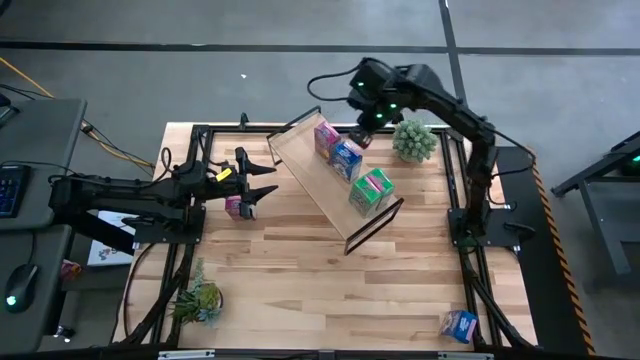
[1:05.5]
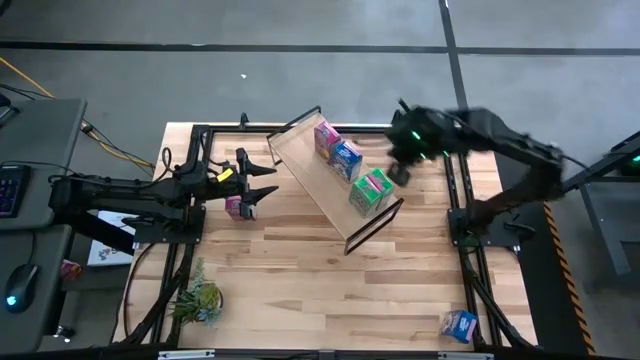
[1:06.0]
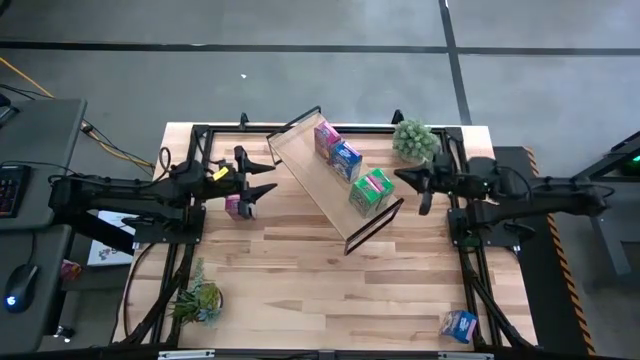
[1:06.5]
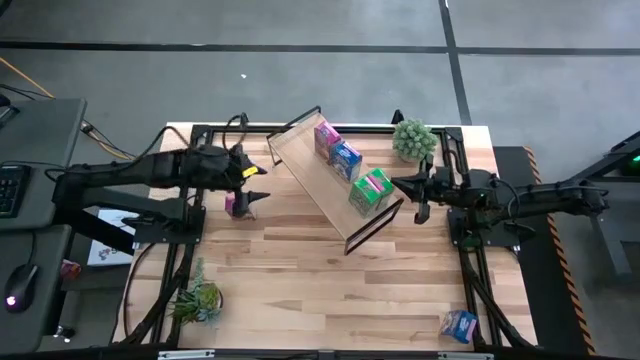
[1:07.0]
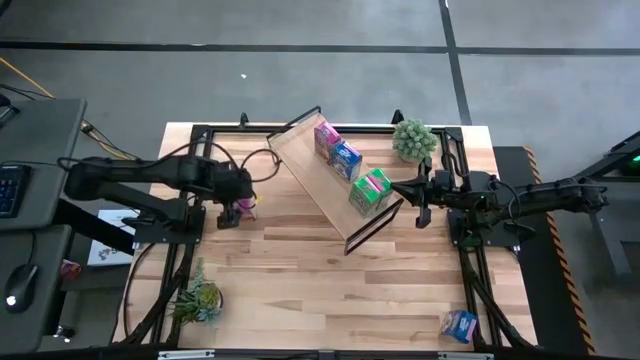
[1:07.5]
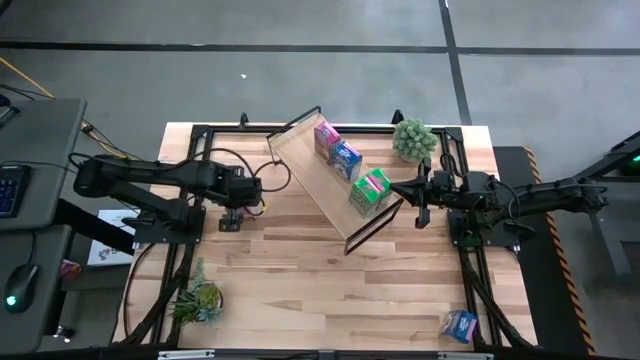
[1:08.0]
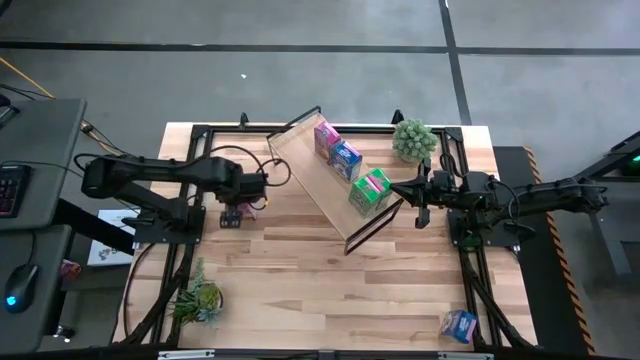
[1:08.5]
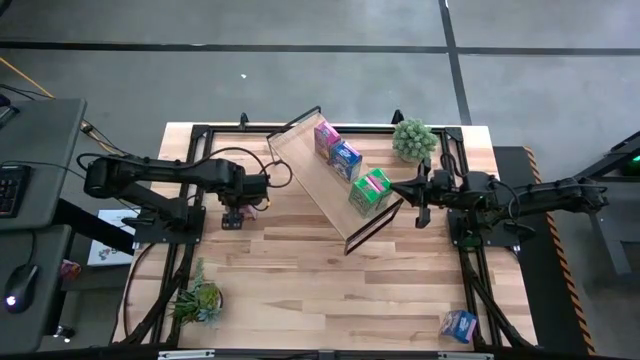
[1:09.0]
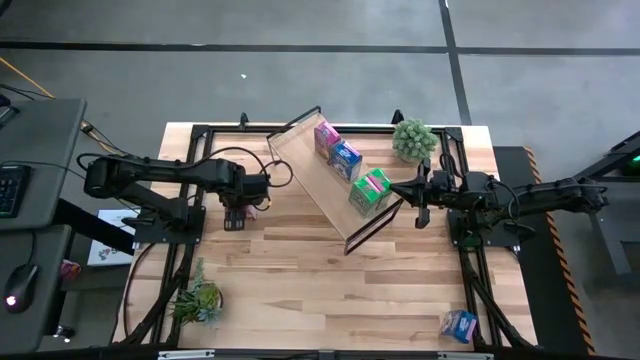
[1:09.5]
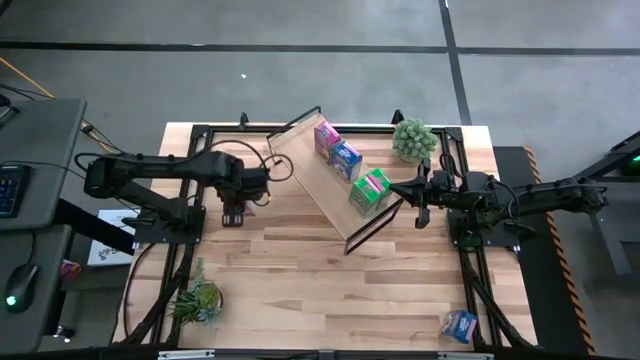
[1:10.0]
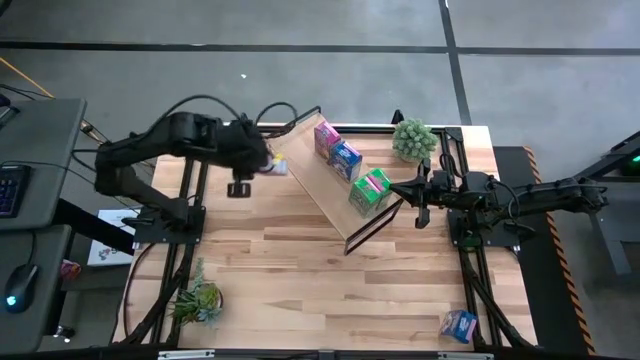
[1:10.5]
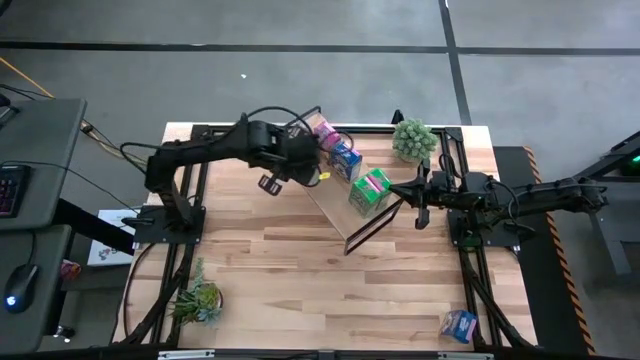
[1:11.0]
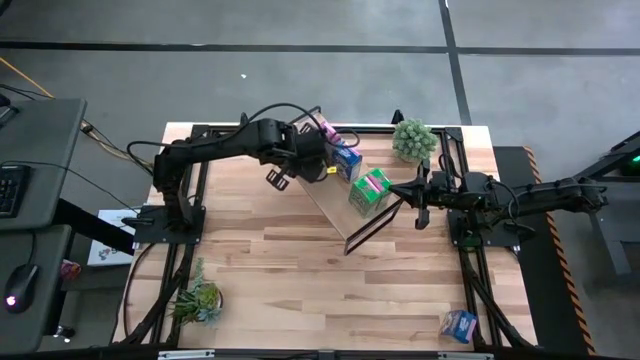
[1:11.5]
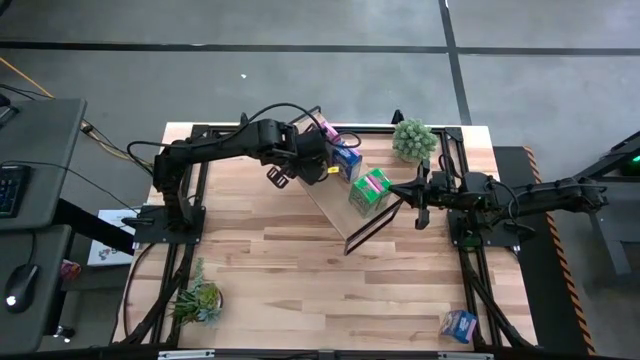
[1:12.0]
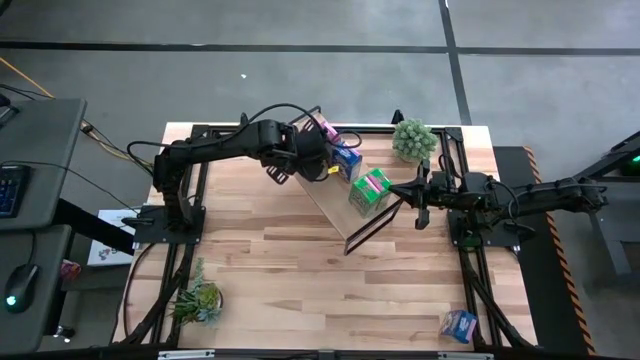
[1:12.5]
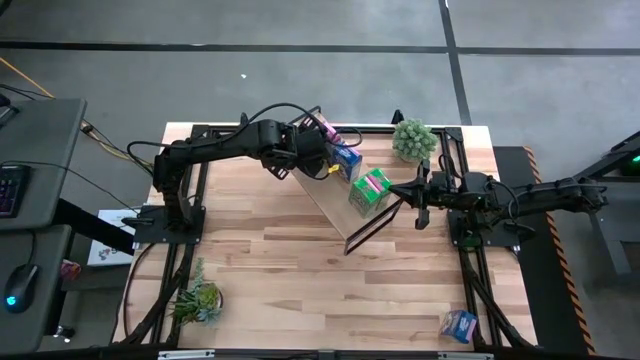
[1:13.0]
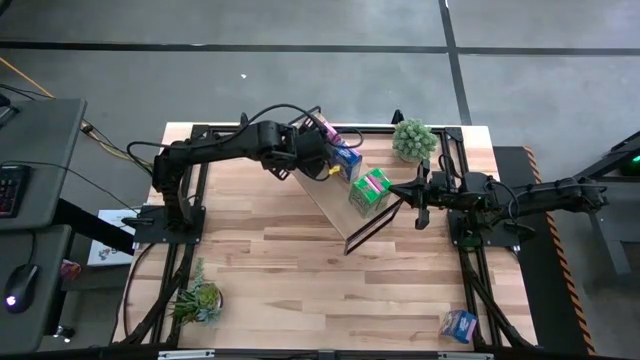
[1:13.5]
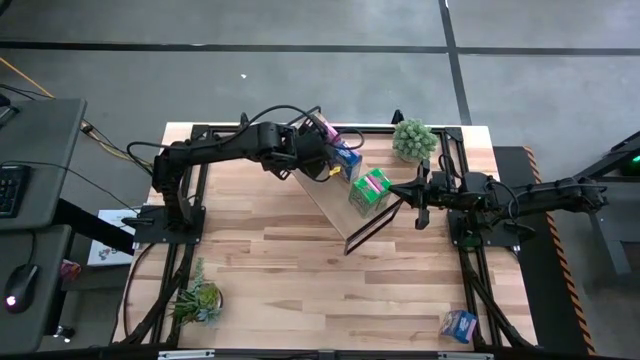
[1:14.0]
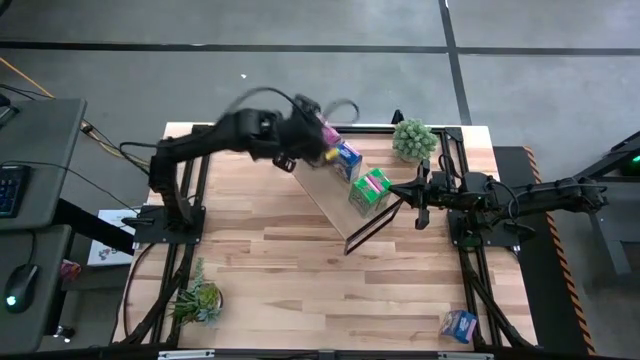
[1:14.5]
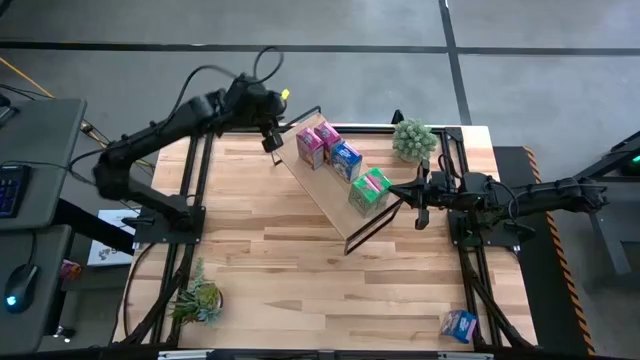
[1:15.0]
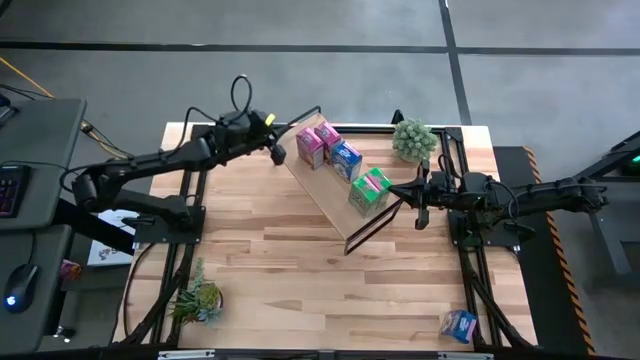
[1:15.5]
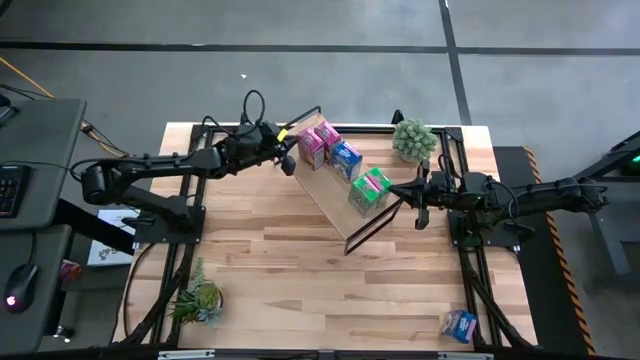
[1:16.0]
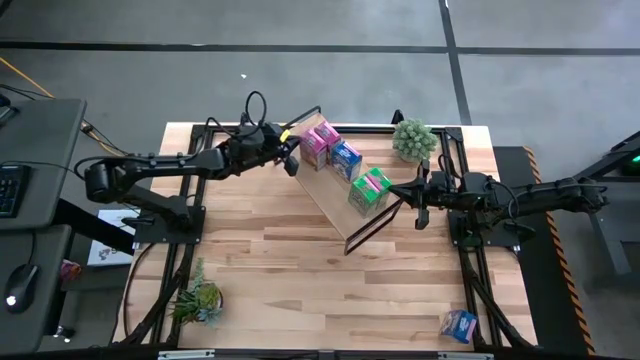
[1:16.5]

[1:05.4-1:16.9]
Task: Stack cereal on shelf
Put the purple cereal box aligned with the other purple cereal box on the shelf

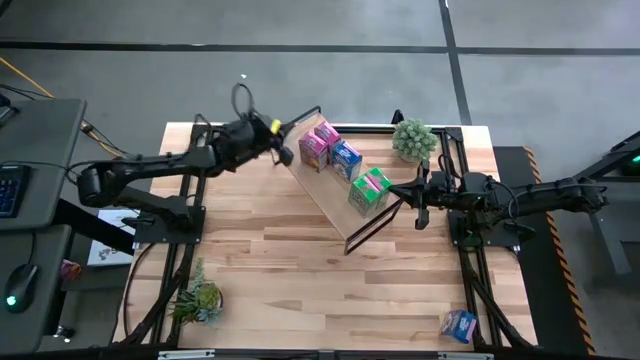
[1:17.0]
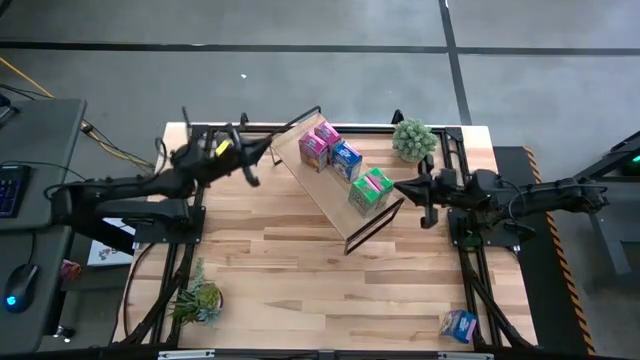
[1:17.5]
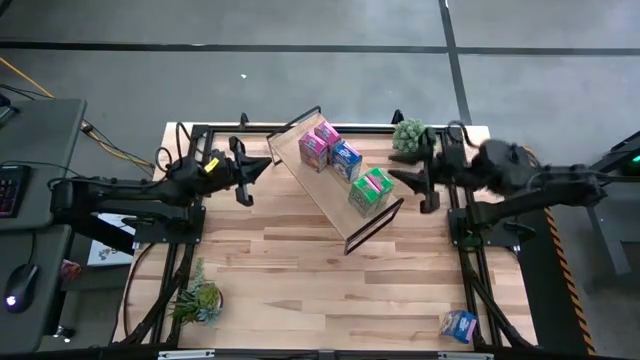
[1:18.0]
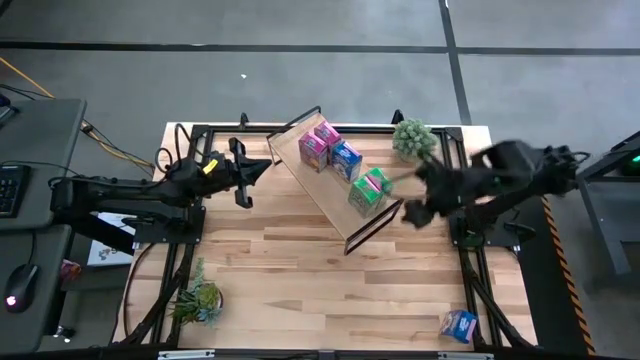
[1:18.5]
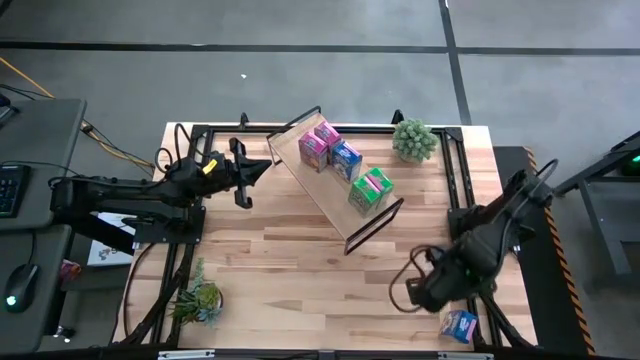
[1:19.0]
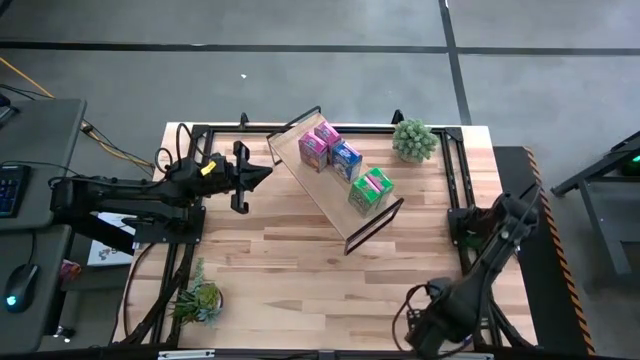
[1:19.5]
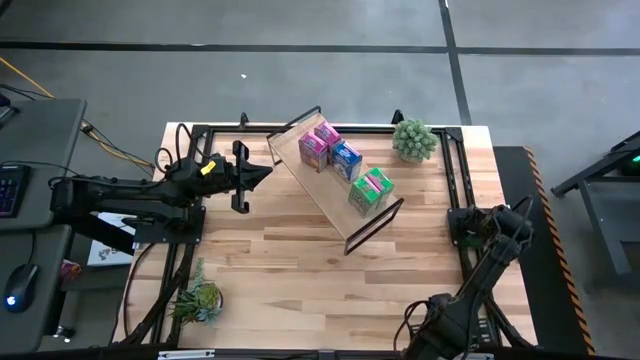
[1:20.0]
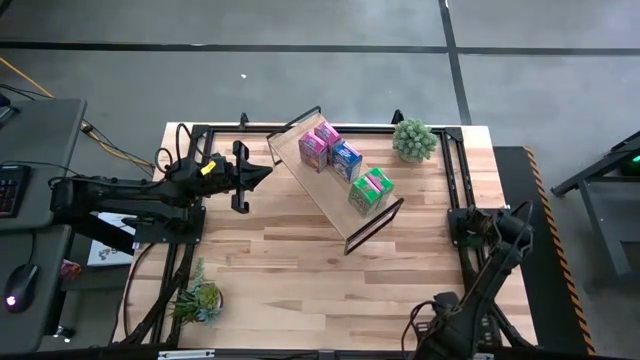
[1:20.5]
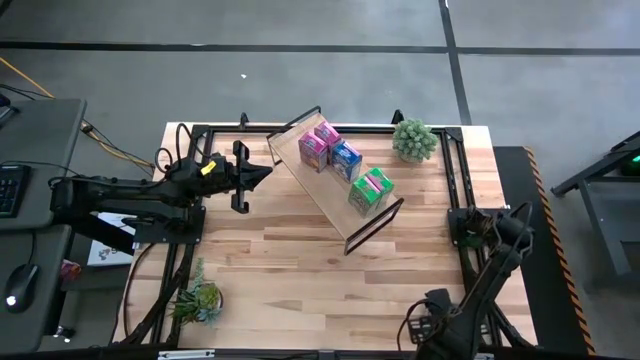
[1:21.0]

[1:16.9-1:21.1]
Put the blue cereal box aligned with the other blue cereal box on the shelf

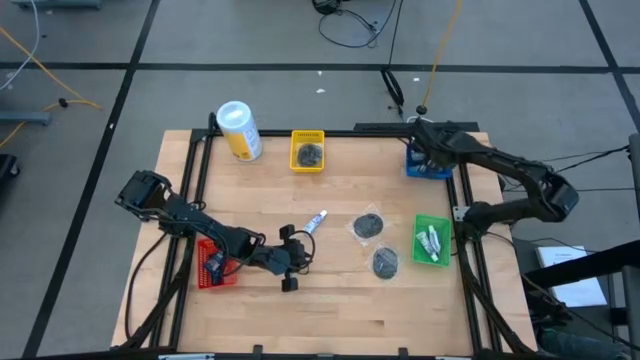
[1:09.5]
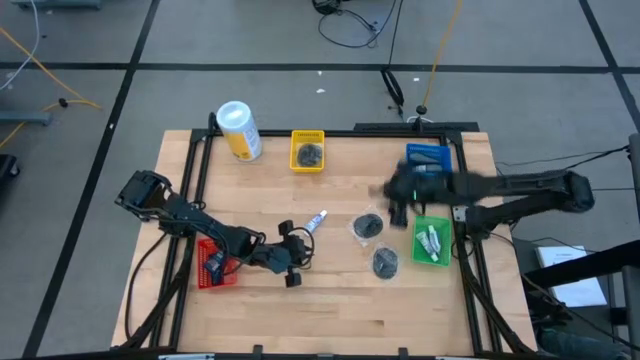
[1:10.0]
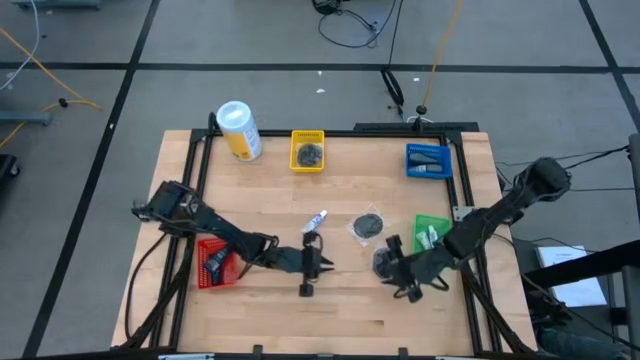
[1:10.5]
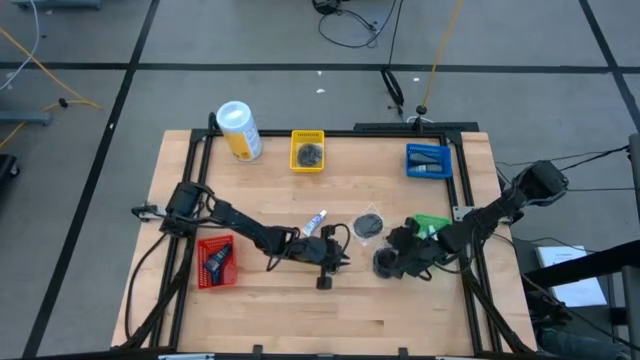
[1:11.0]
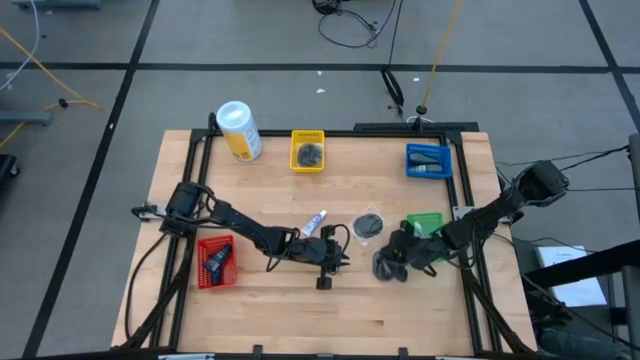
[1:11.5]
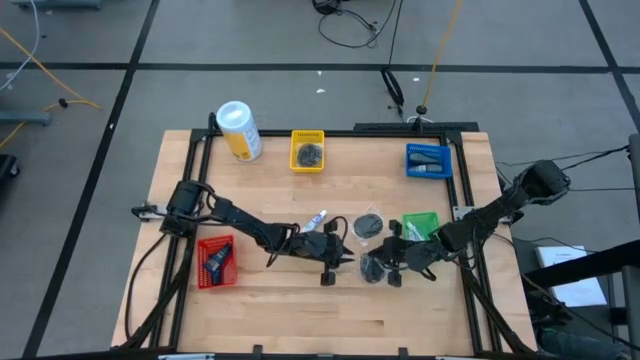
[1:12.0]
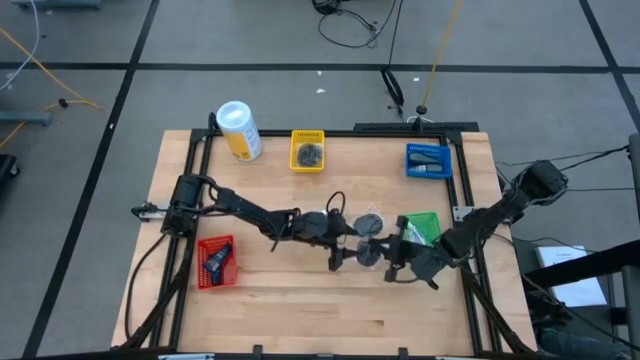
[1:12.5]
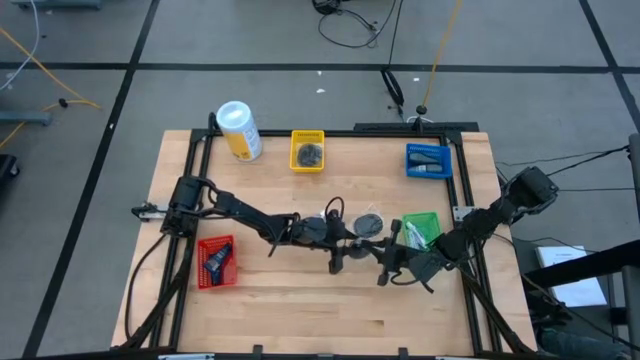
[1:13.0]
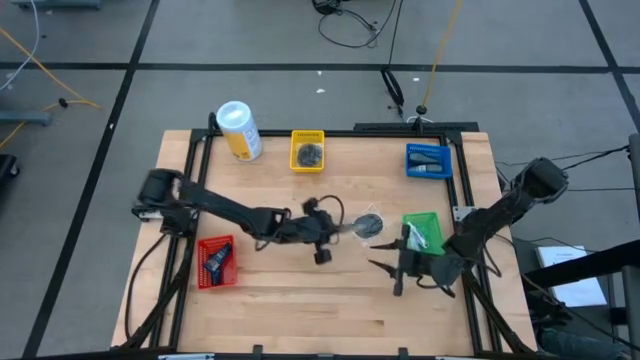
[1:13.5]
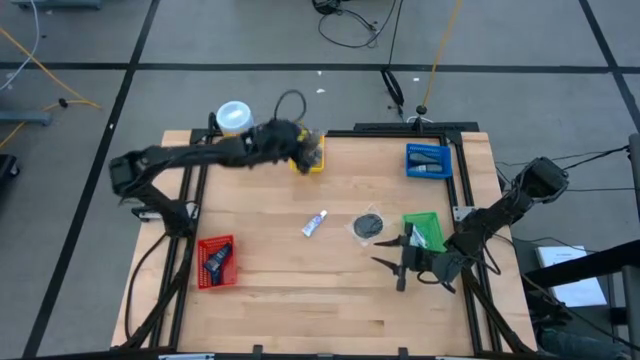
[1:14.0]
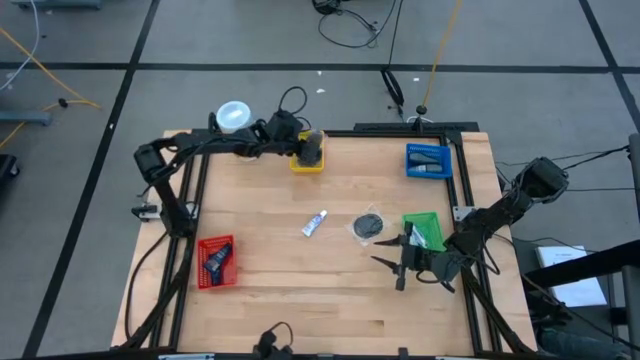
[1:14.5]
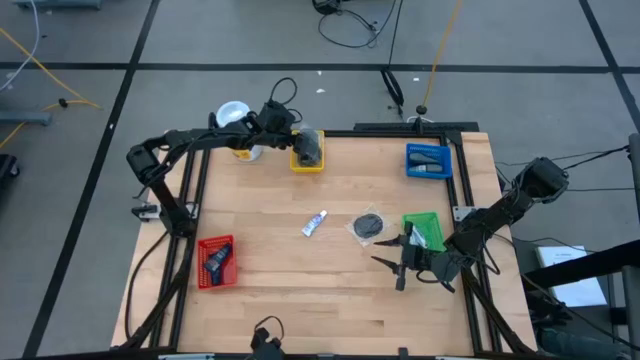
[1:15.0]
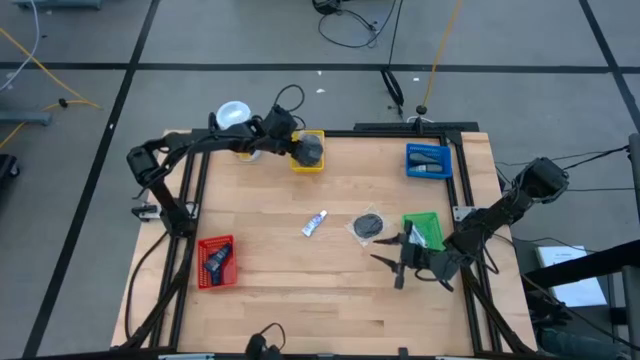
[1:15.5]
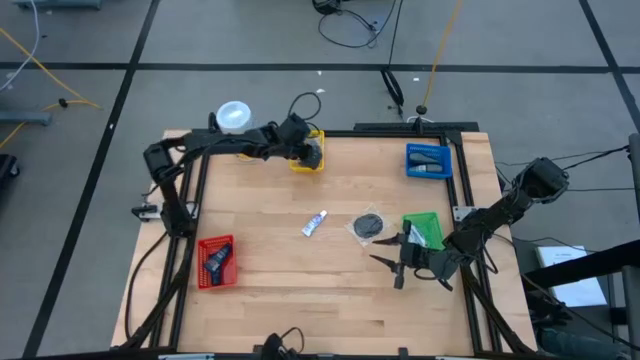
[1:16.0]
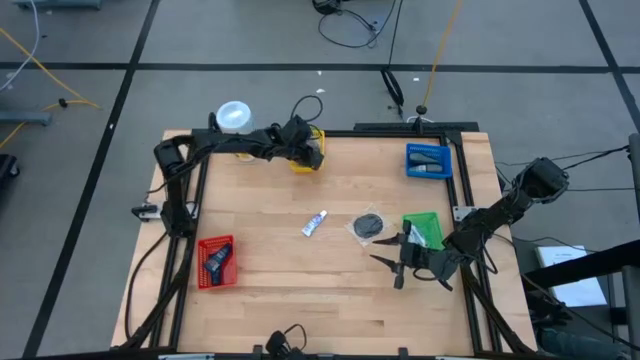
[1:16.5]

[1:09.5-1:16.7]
Task: Pick & Place Travel size toiletries
Put the hairbrush into the yellow bin
